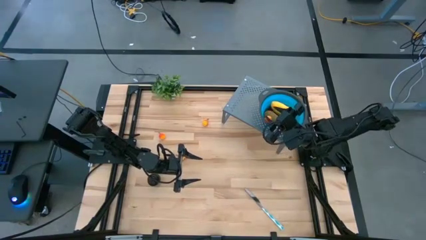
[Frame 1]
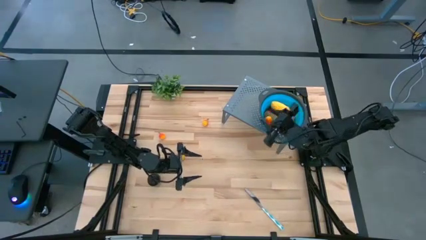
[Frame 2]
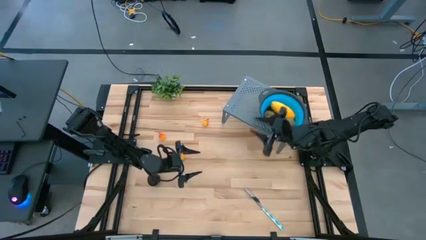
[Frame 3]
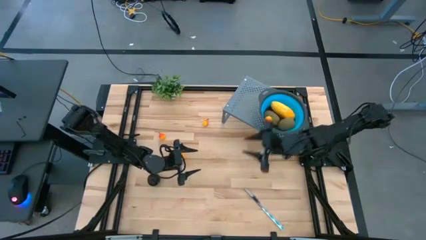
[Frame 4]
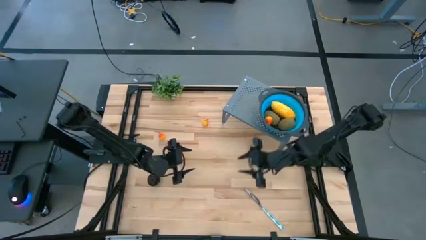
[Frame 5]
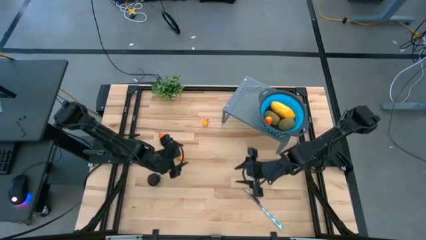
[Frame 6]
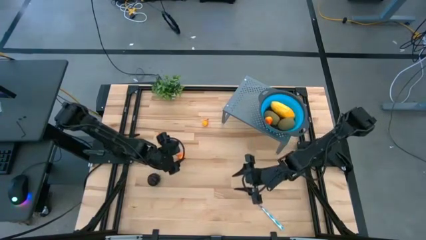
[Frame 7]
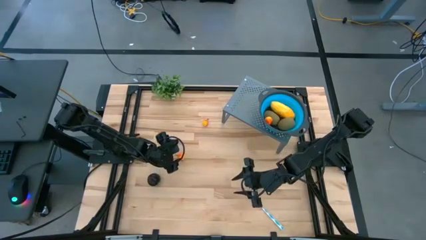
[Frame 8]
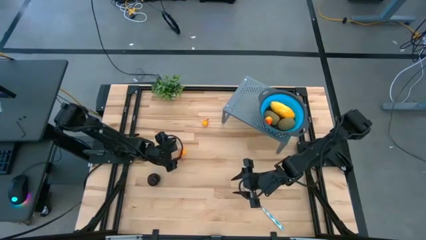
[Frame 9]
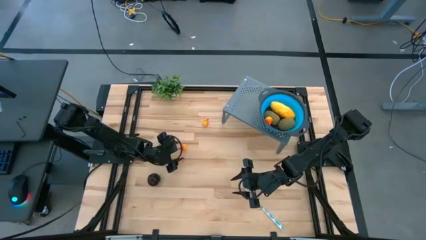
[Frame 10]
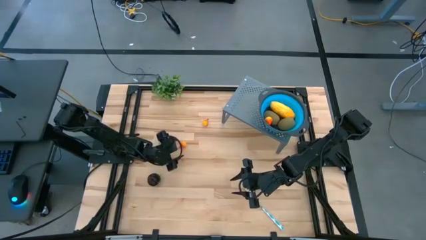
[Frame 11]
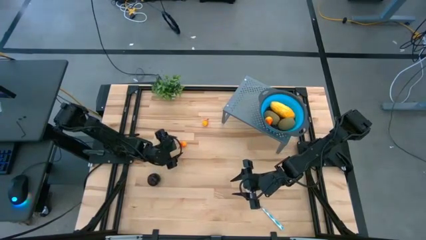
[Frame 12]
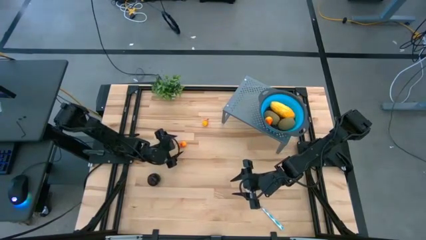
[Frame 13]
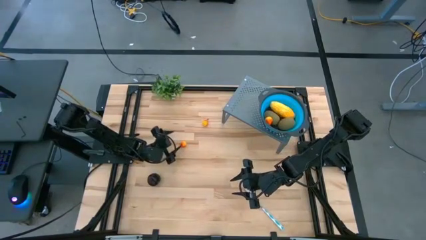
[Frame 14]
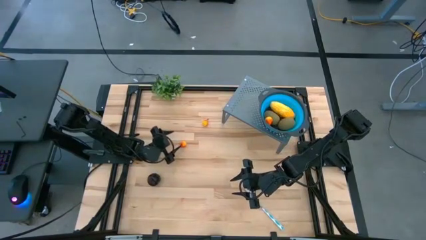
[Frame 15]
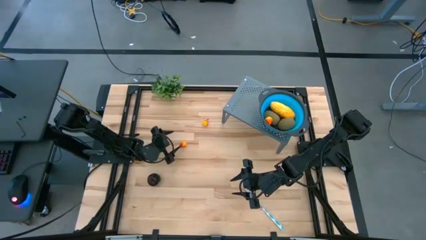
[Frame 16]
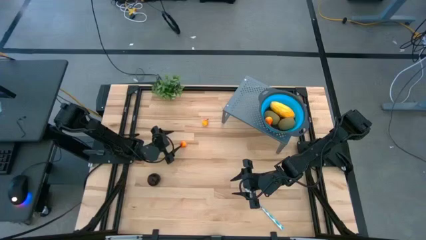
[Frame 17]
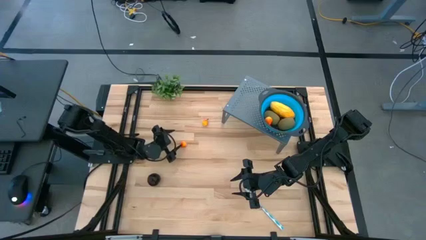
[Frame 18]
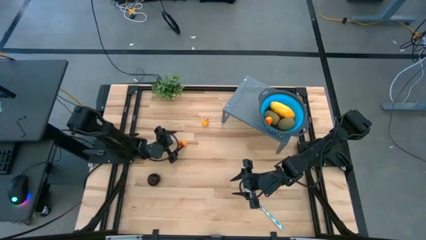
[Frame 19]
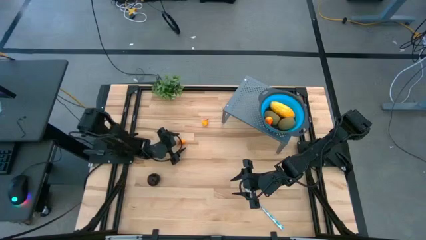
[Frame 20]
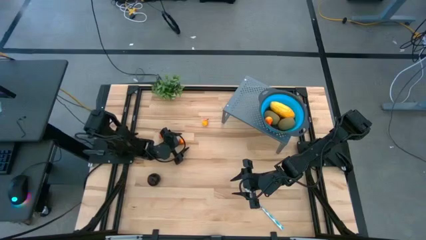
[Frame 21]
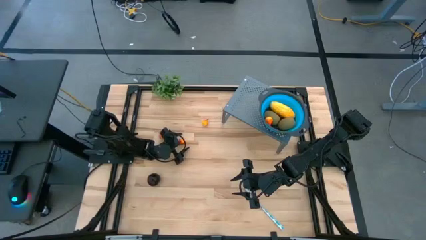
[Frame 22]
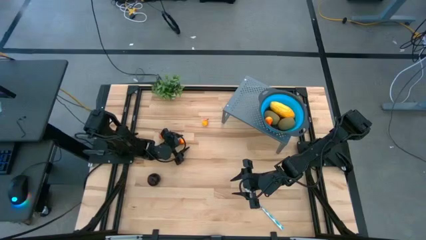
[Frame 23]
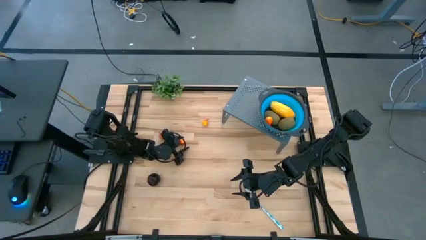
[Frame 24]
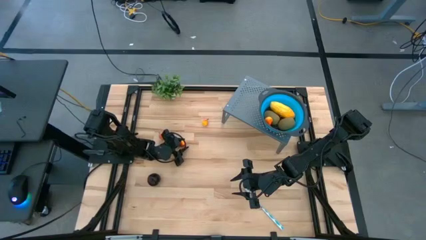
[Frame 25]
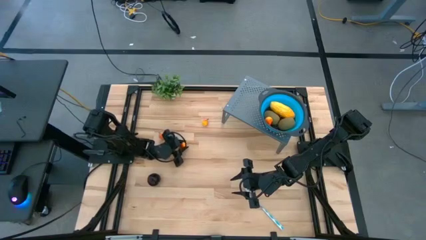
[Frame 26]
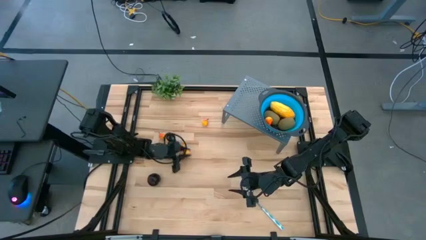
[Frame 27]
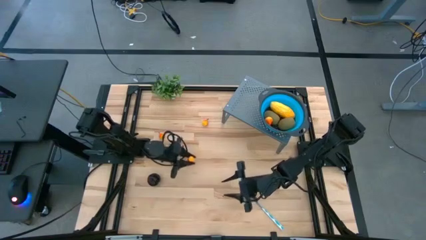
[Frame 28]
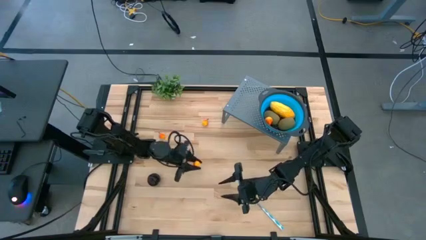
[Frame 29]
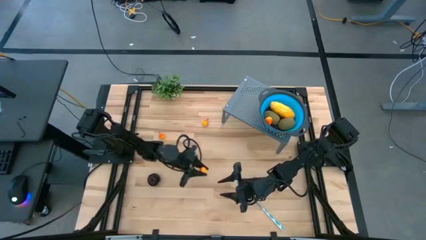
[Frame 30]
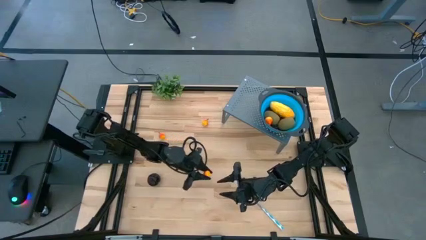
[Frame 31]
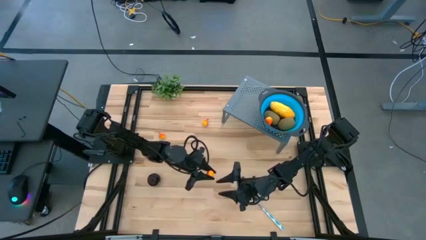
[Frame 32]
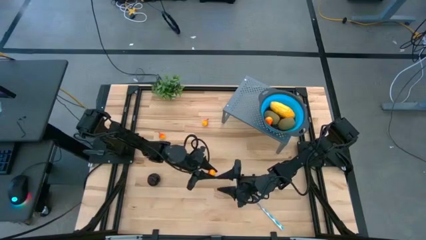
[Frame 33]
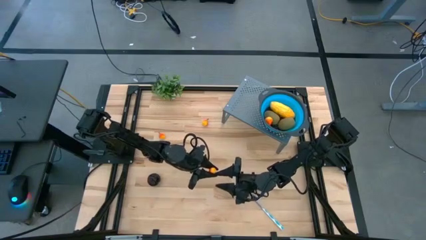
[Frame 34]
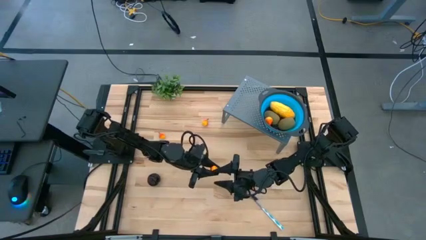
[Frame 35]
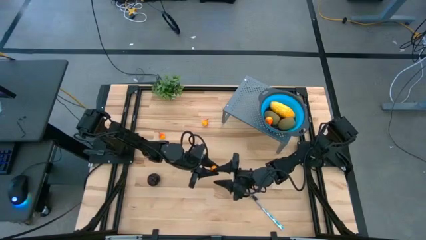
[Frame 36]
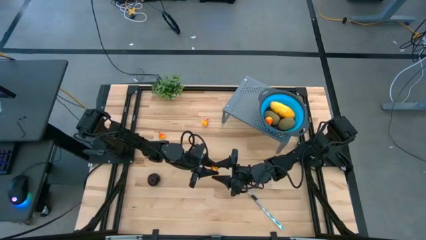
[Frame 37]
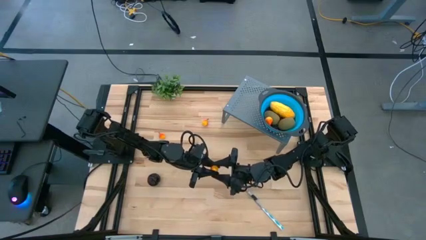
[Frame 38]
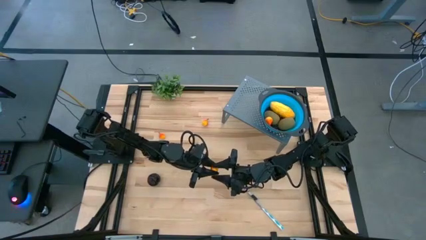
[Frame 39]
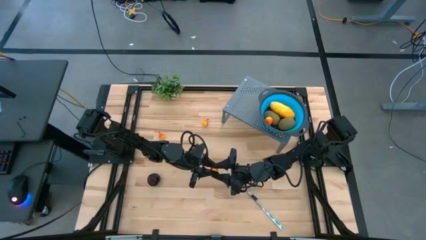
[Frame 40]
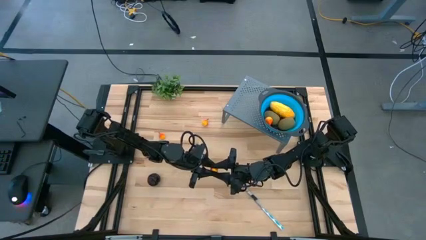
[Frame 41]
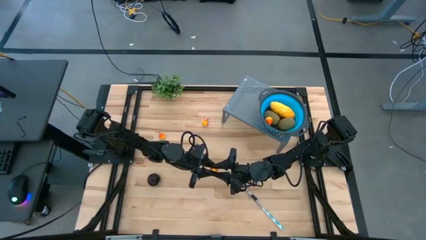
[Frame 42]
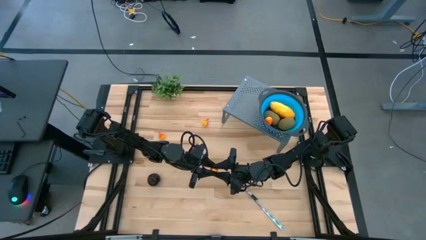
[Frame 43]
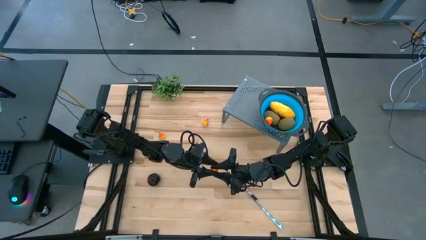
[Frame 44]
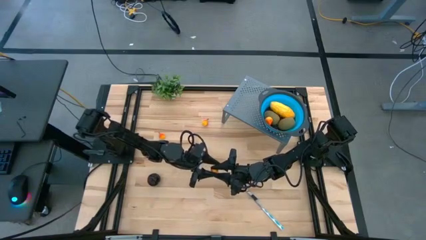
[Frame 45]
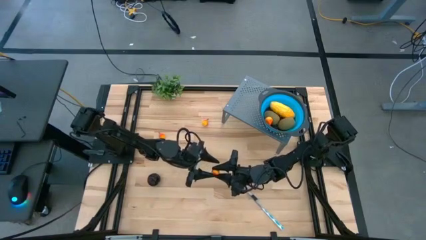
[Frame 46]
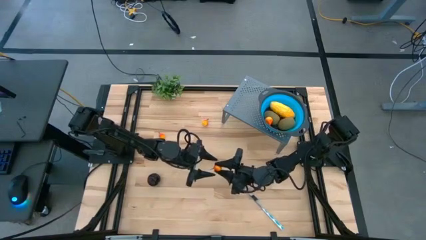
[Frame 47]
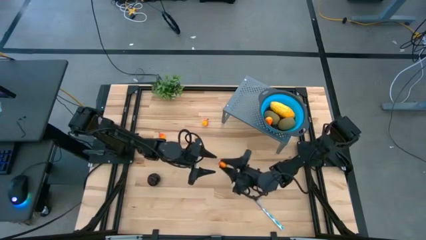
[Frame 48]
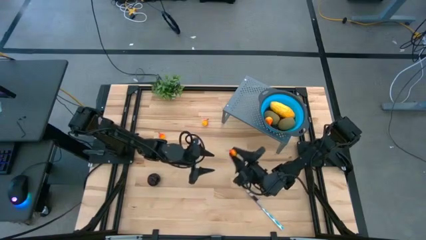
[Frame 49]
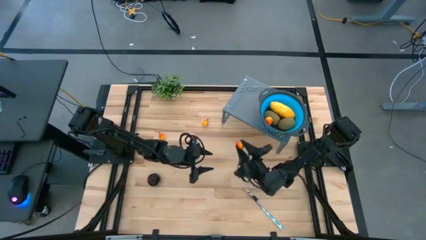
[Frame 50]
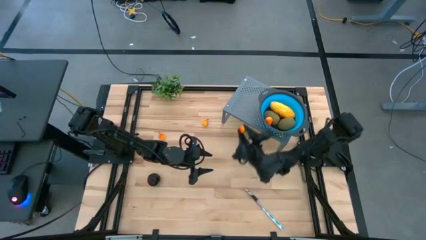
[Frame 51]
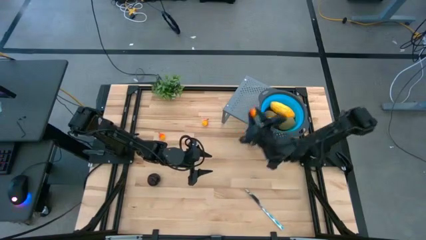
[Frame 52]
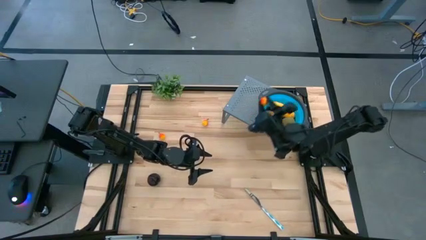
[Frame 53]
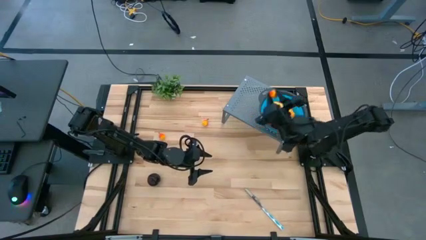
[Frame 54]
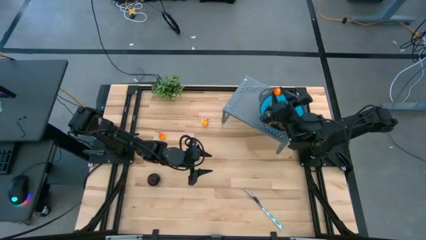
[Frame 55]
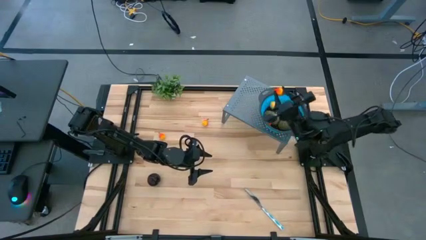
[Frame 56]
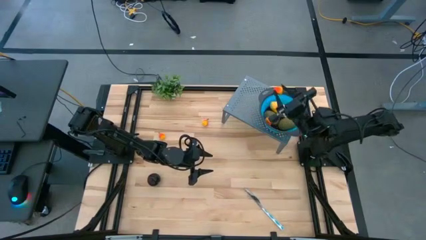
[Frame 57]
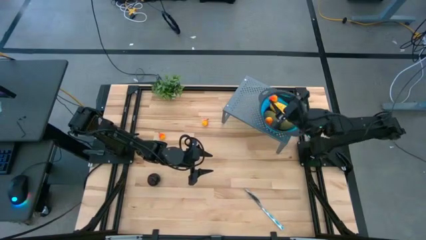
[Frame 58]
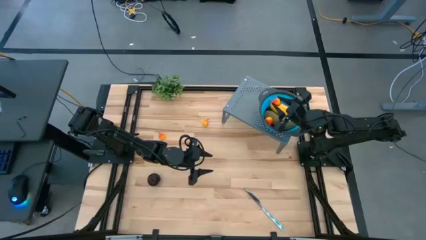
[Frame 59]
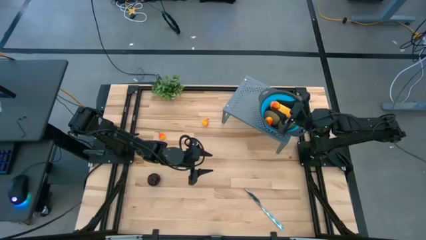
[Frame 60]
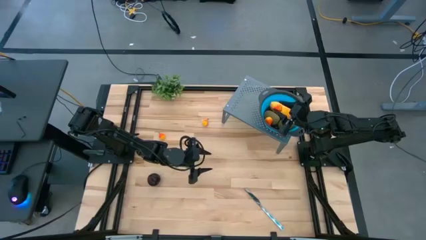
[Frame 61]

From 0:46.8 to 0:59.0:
Task: Pick & Place Fruit
Put the pear into the strainer bowl on the shelf
